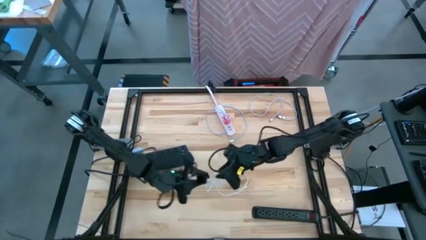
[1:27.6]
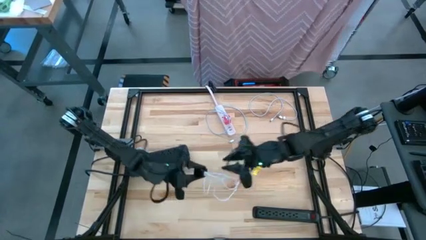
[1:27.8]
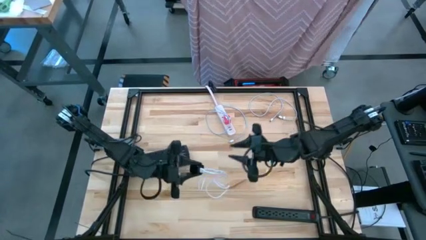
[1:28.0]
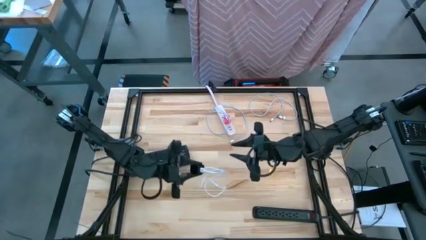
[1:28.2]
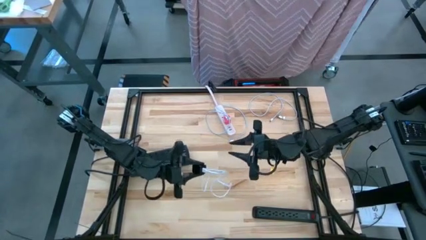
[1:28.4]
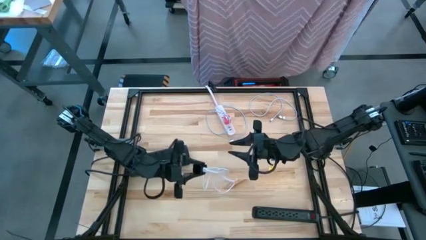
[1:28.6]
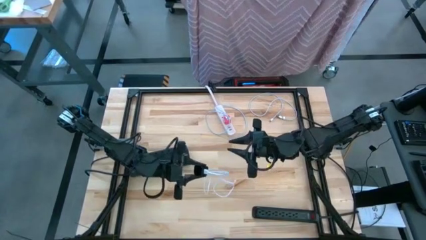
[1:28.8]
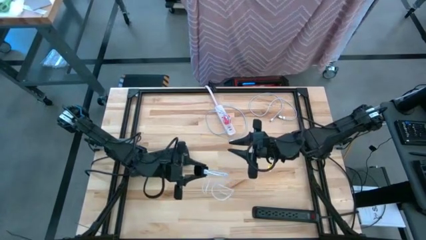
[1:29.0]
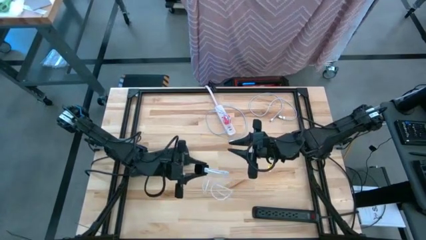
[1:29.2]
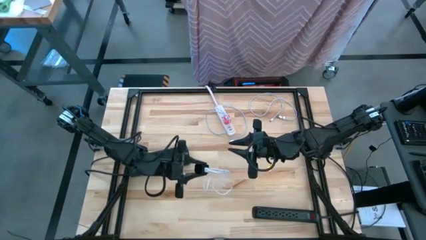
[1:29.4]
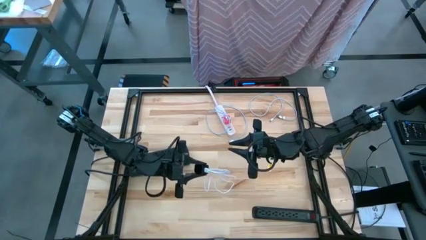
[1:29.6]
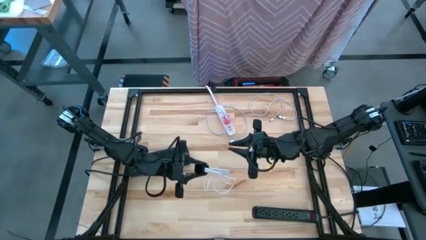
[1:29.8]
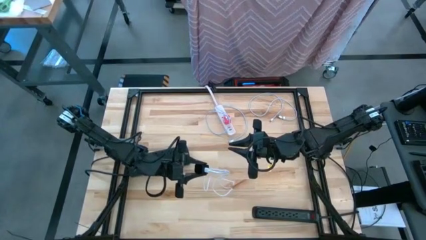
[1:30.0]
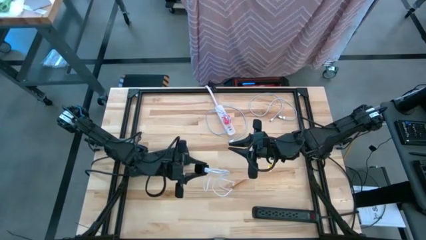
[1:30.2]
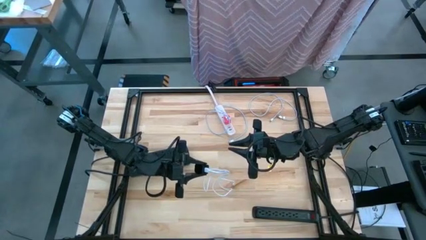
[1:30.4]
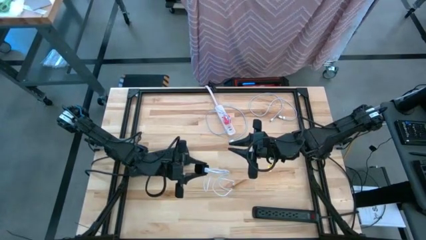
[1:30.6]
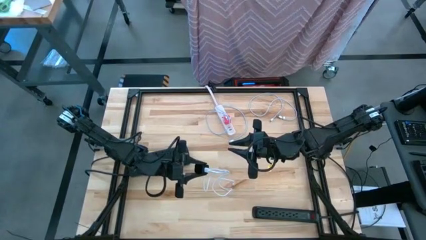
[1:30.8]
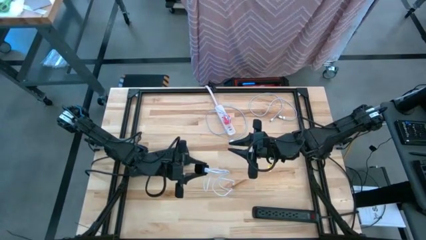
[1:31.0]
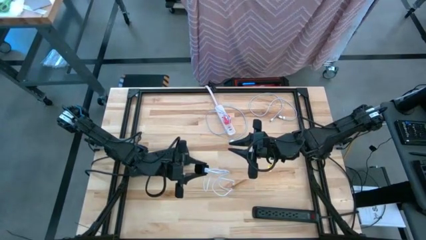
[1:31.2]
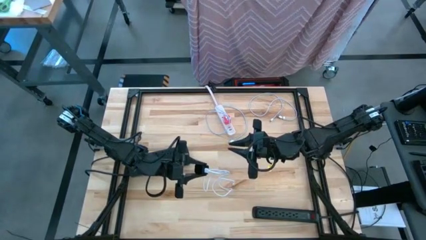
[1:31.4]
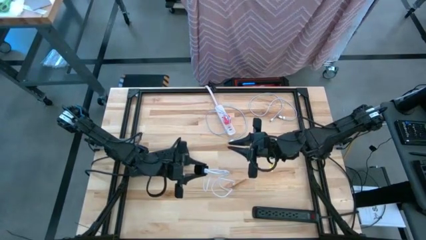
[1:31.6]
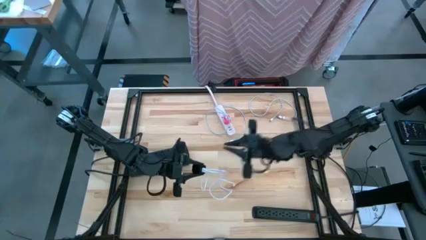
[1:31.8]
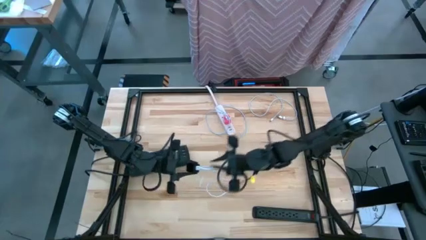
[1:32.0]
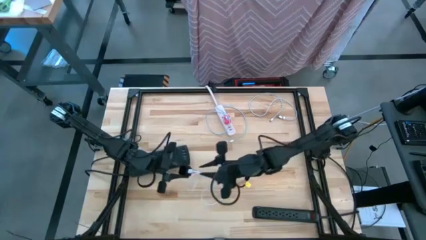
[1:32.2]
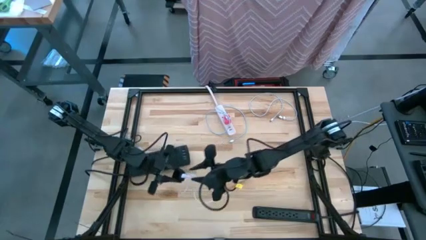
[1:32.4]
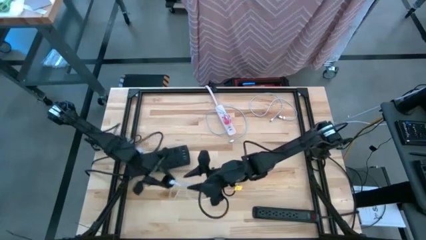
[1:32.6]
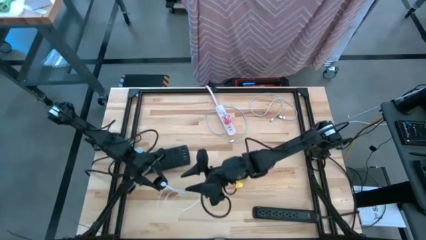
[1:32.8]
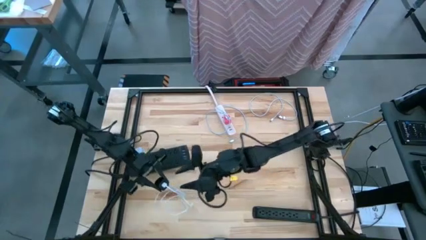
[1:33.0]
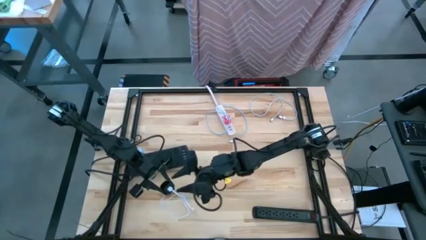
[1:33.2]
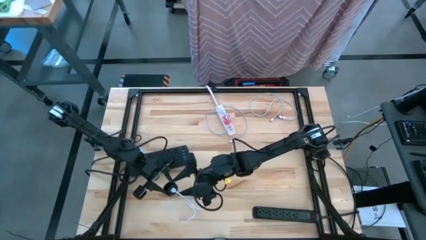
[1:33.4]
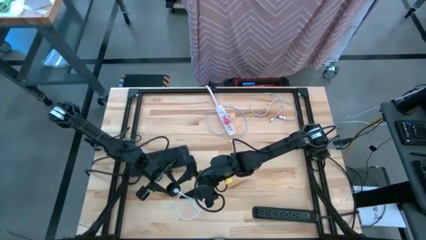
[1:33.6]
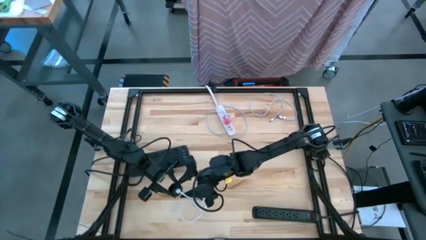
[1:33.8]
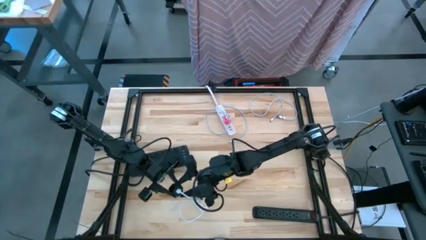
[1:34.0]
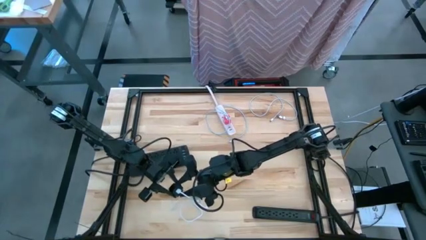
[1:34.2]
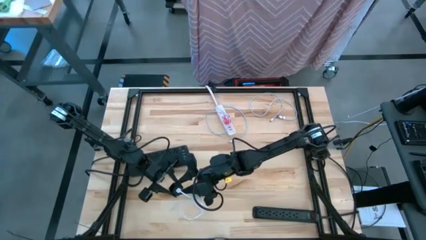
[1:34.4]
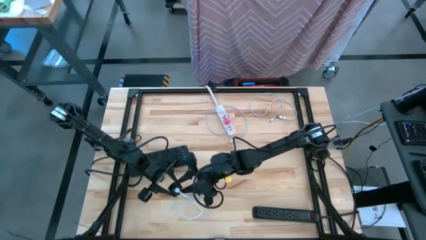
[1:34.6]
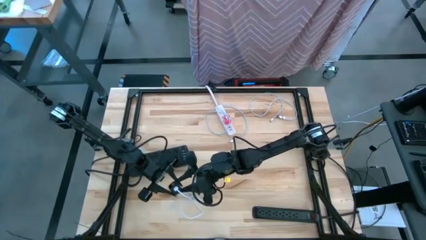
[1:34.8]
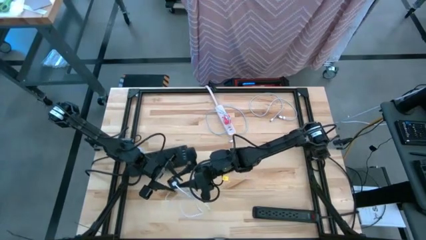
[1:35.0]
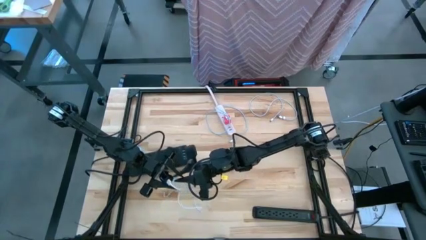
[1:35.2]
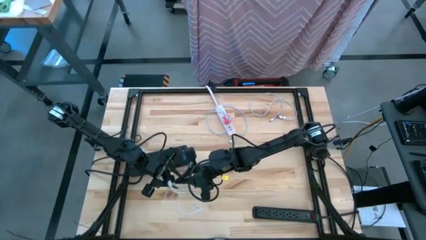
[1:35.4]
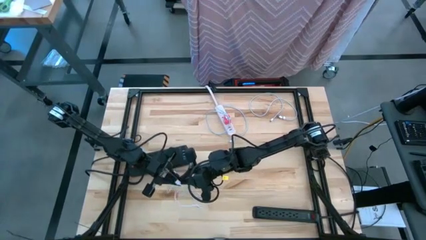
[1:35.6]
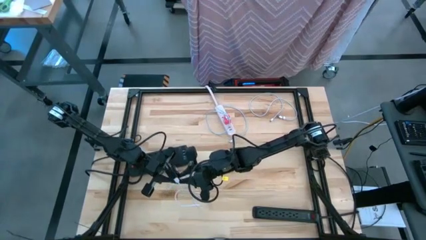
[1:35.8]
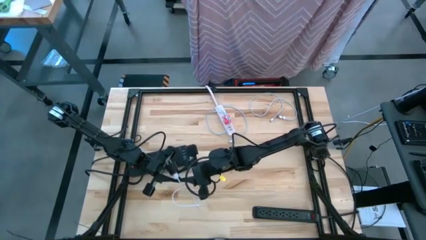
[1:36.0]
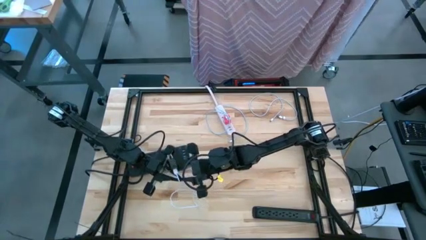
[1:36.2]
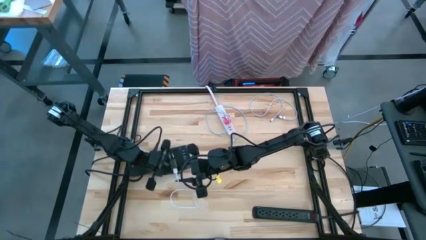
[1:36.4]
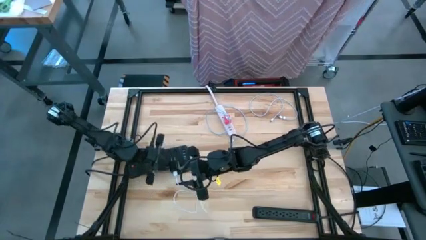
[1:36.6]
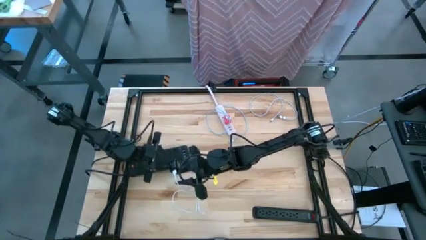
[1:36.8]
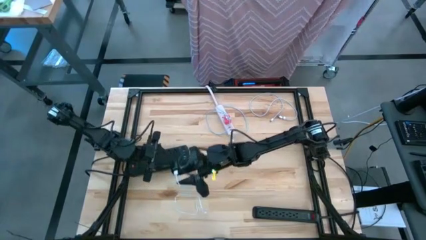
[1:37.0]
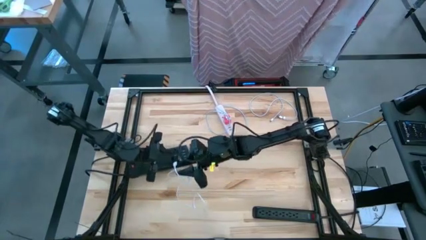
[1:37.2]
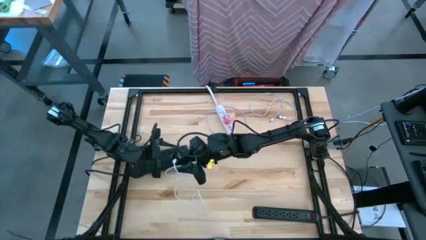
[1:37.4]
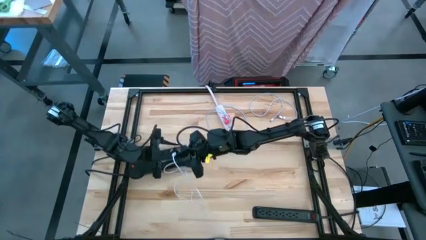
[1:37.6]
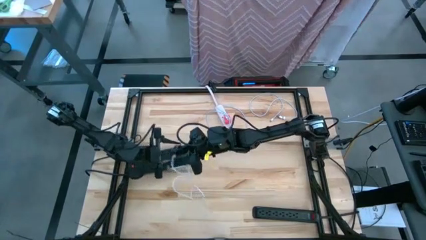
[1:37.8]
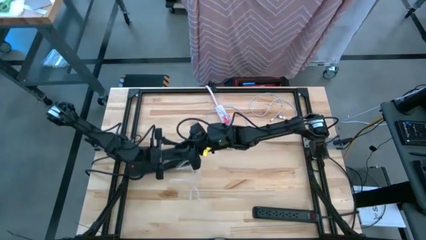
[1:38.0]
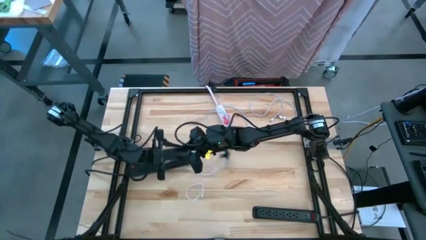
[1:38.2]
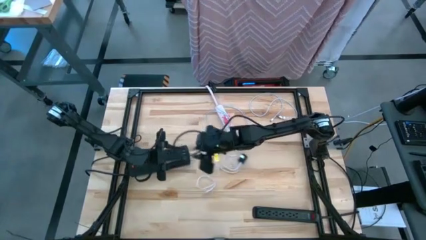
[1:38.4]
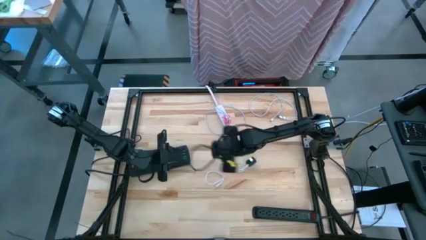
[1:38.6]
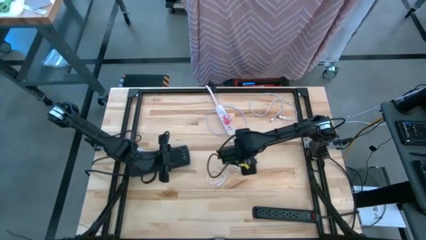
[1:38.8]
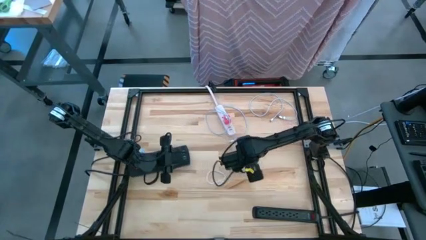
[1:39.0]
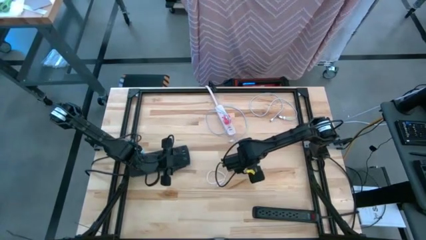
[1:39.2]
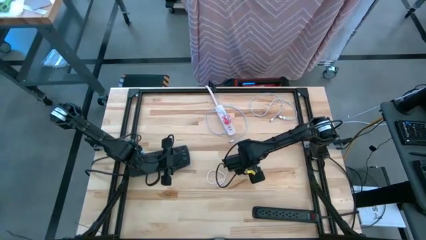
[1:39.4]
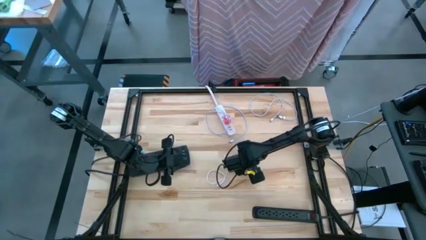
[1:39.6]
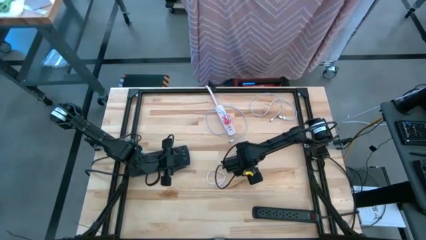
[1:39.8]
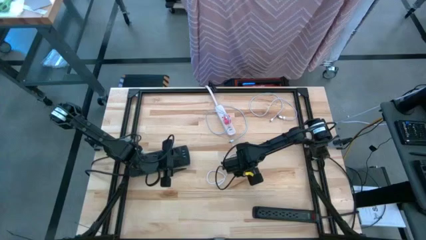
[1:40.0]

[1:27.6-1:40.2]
Task: Insert USB
Insert the black charger adapter into the left black outlet extension

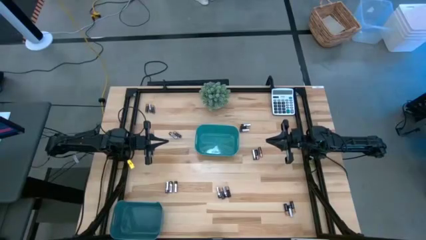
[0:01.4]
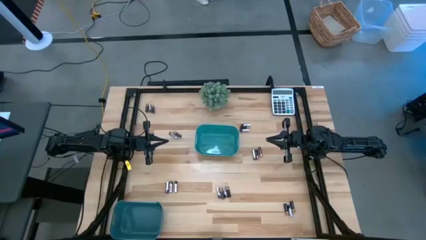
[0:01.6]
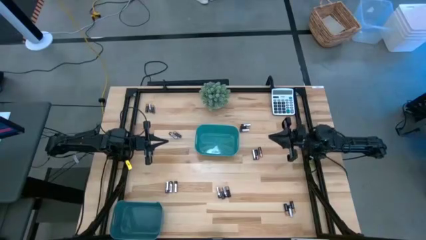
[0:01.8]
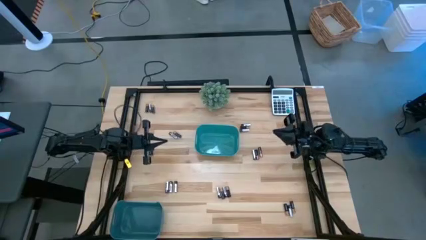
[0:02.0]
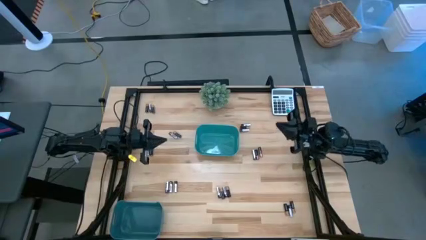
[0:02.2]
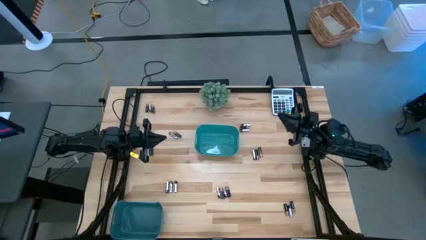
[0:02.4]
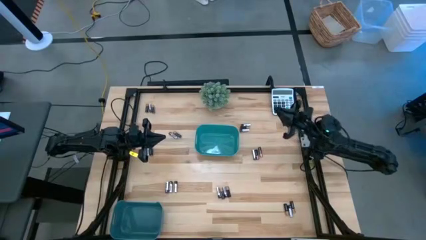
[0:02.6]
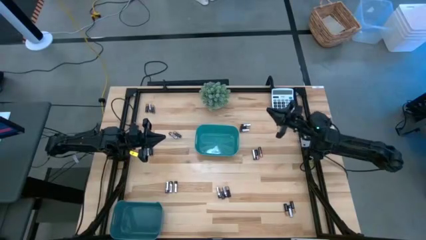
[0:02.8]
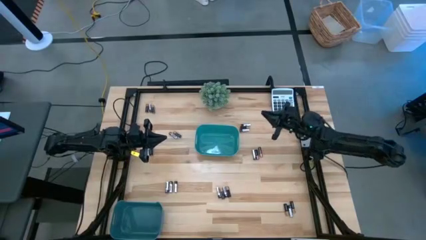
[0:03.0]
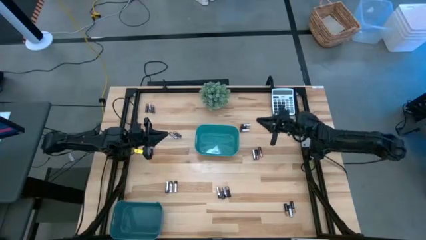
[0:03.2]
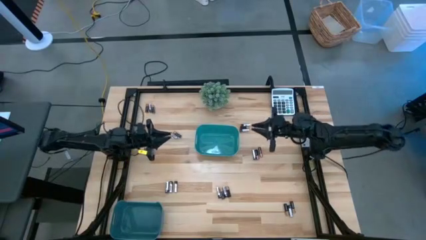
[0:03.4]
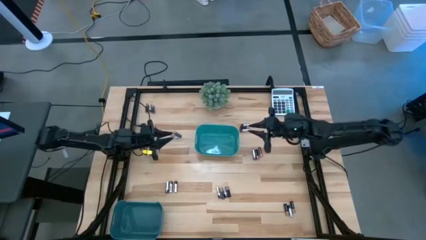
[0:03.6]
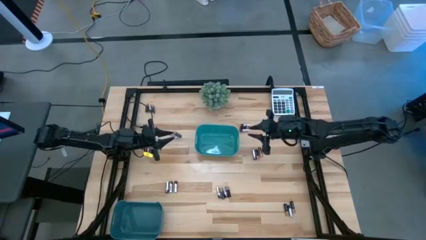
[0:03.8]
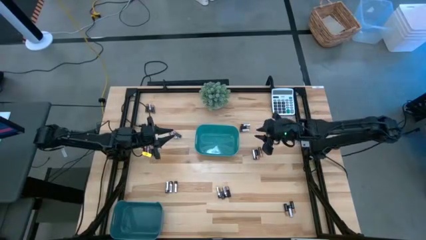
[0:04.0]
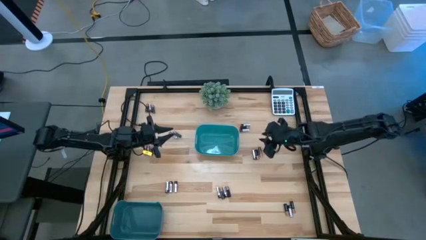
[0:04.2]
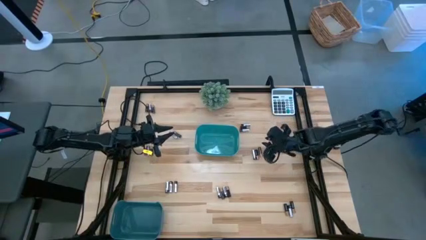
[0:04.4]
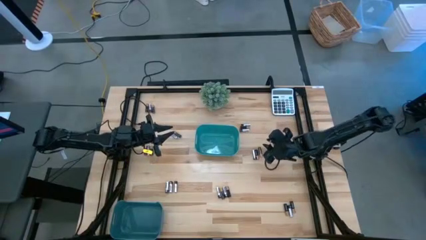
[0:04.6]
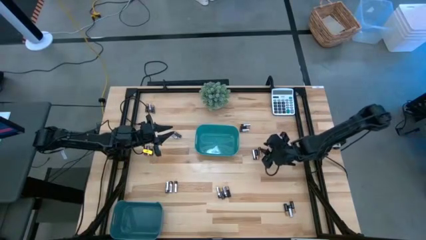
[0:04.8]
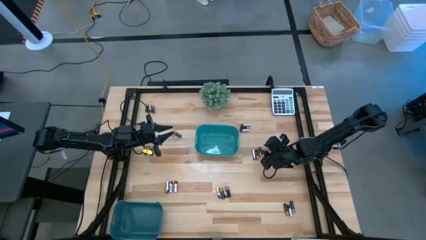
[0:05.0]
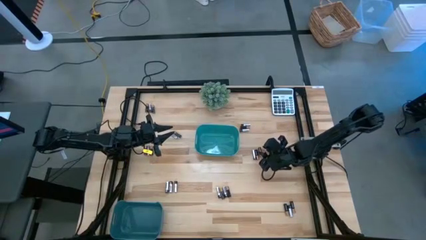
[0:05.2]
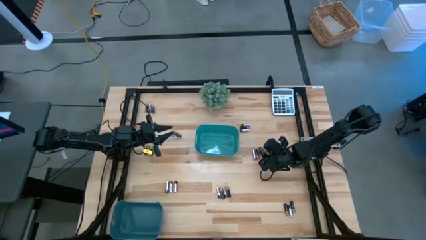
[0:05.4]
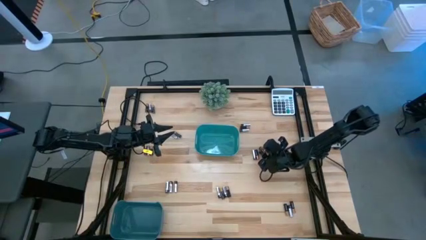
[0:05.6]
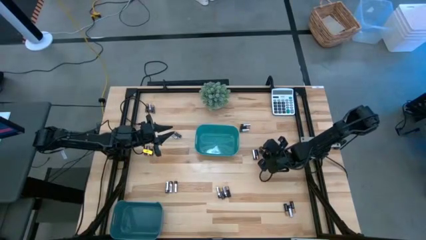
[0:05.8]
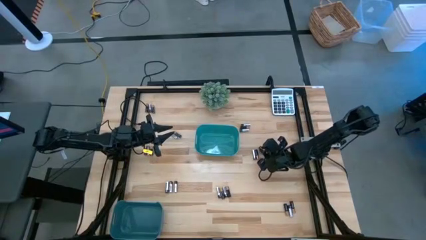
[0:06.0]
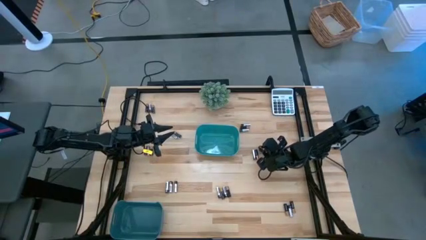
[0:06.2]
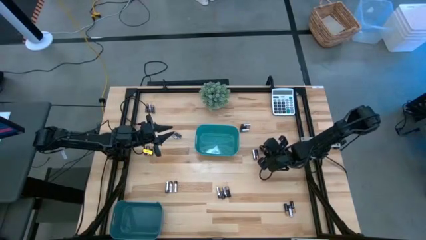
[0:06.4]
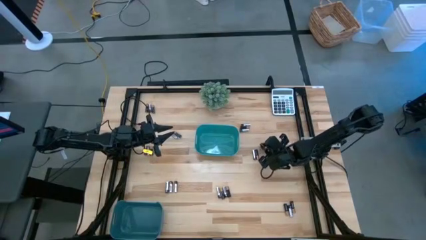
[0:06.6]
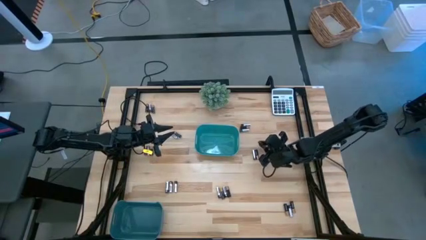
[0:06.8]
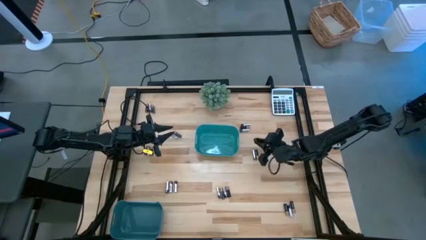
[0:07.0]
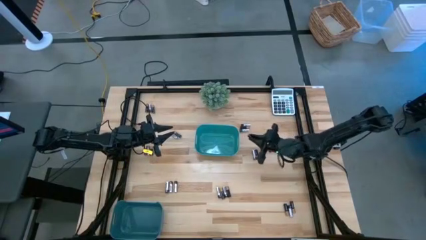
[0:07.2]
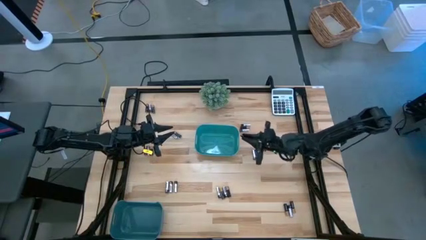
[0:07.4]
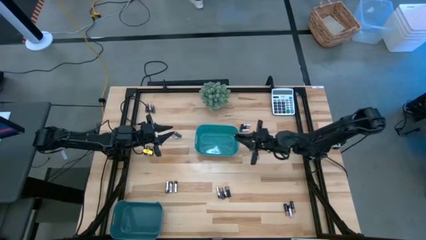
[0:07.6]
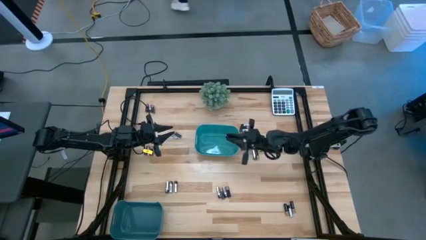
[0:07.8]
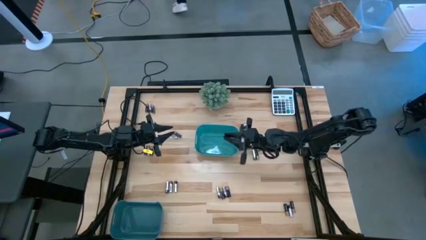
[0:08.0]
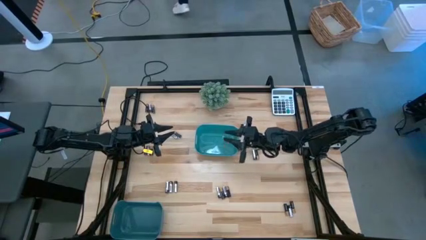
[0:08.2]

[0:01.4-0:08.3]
Task: Sort batteries
Put the black battery into the green bin
